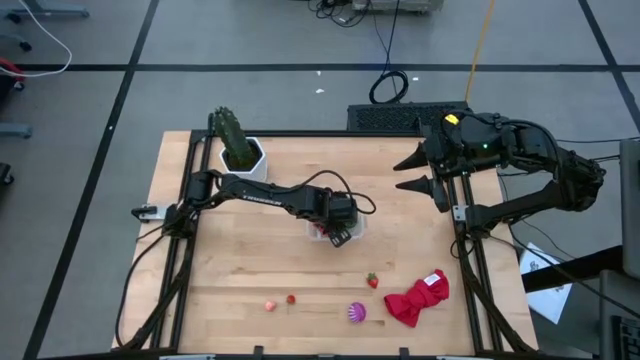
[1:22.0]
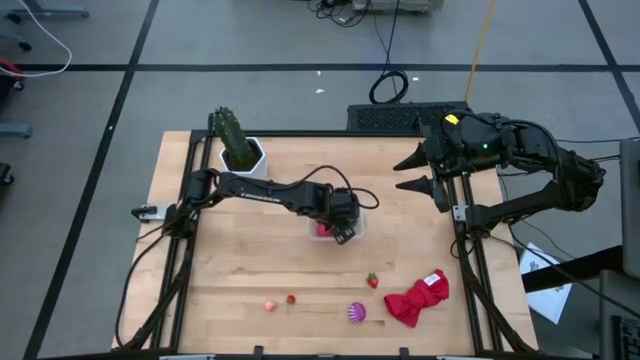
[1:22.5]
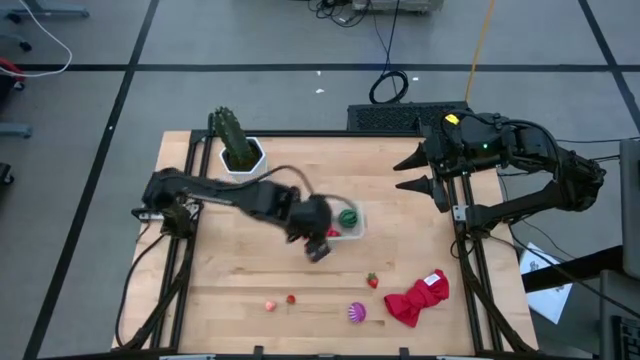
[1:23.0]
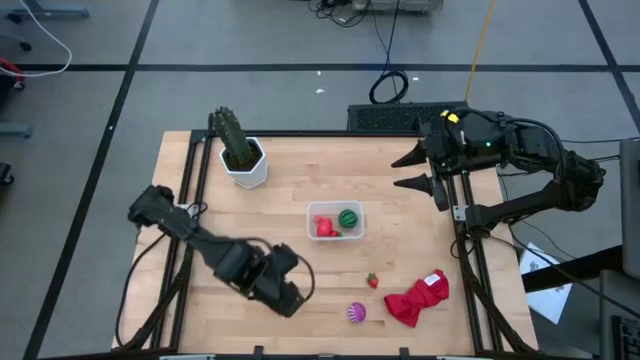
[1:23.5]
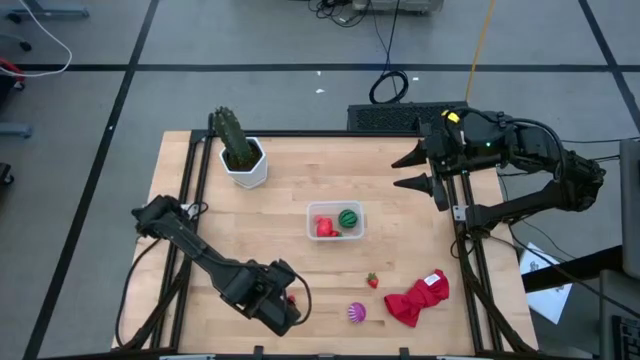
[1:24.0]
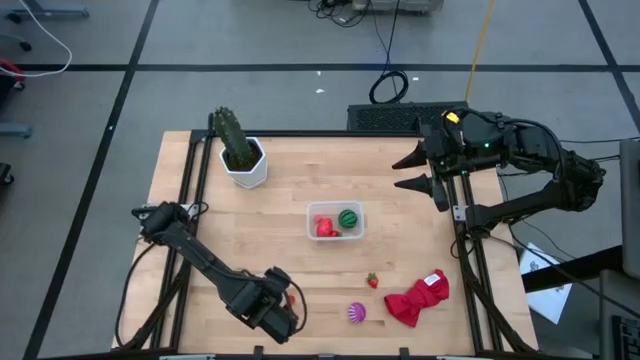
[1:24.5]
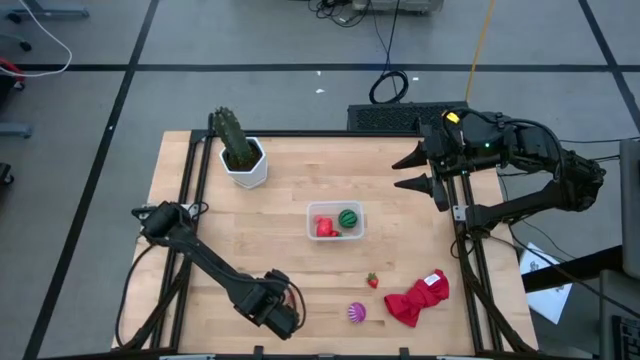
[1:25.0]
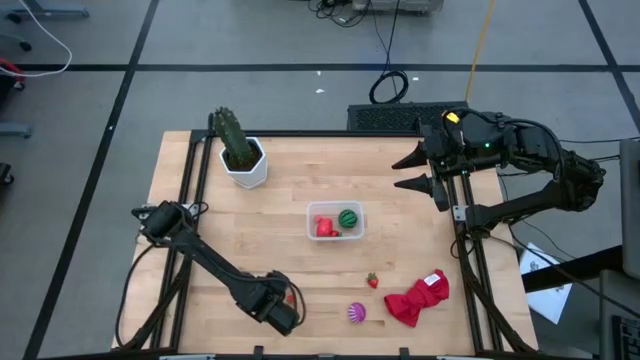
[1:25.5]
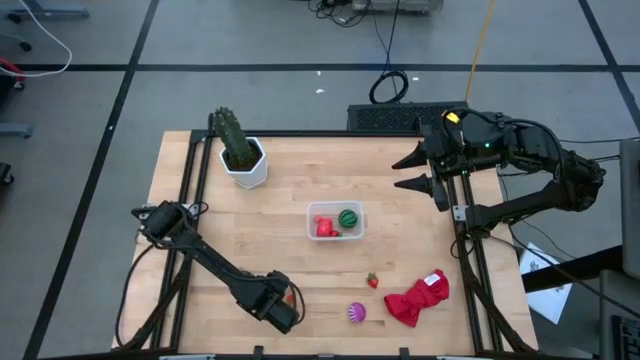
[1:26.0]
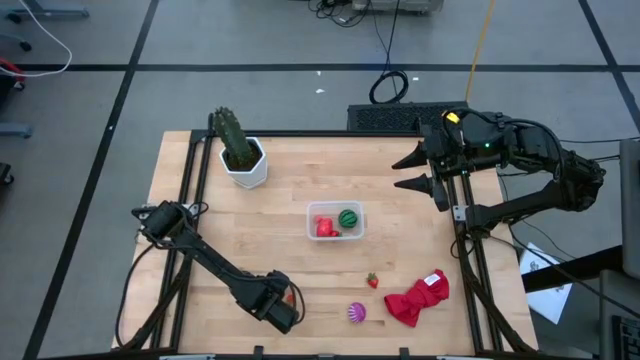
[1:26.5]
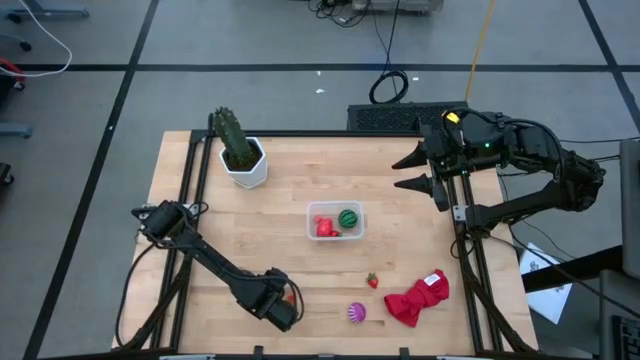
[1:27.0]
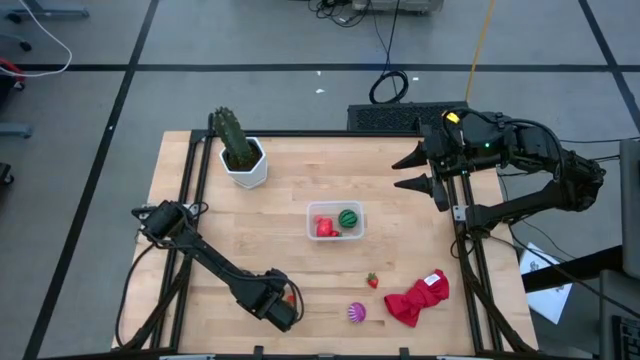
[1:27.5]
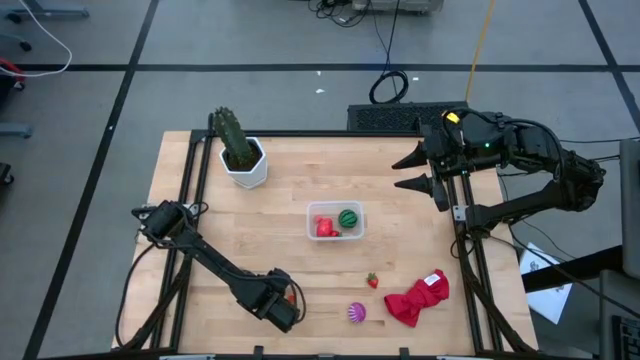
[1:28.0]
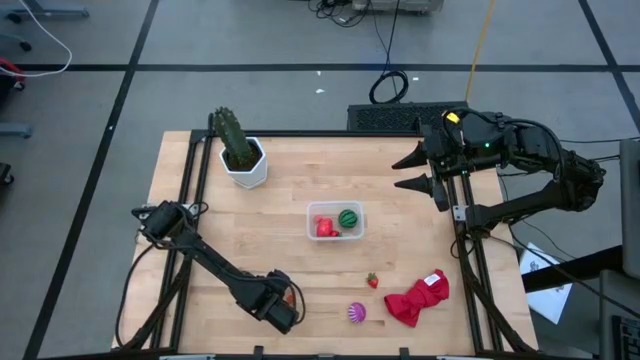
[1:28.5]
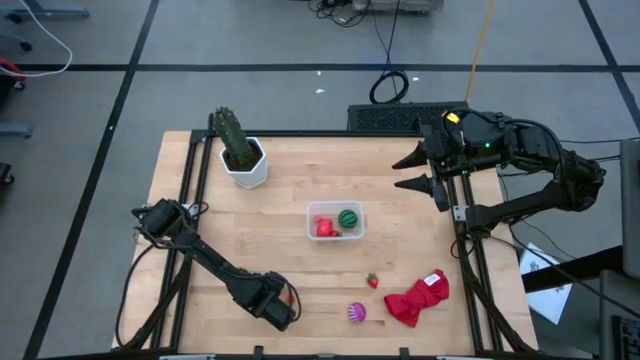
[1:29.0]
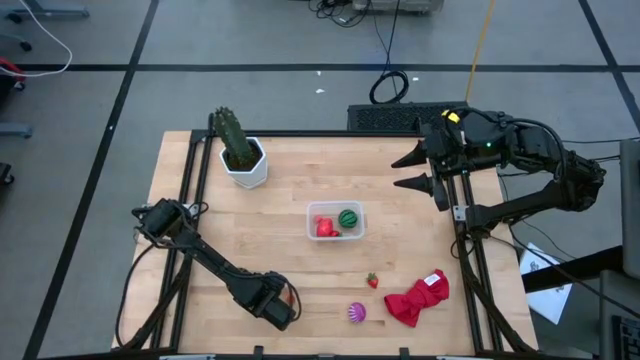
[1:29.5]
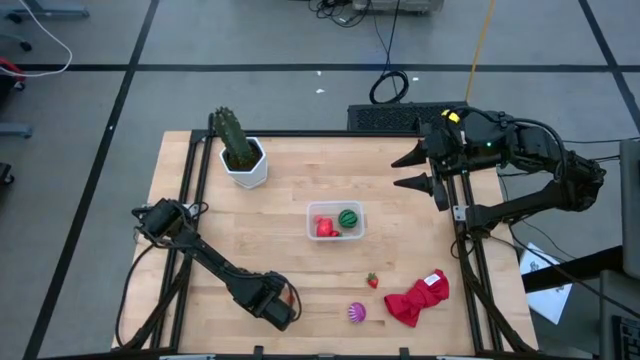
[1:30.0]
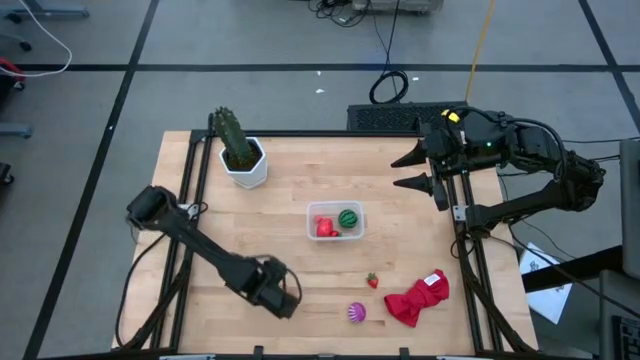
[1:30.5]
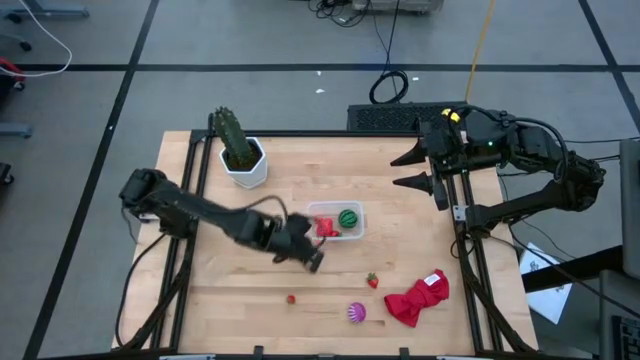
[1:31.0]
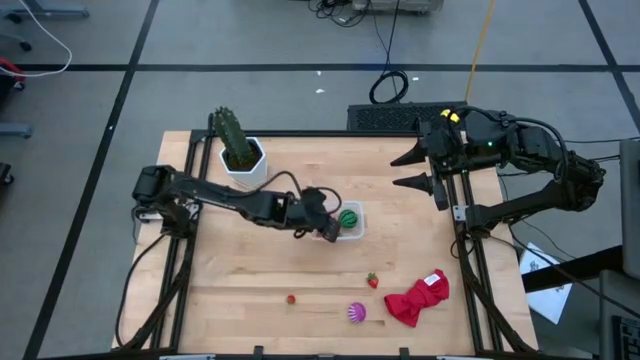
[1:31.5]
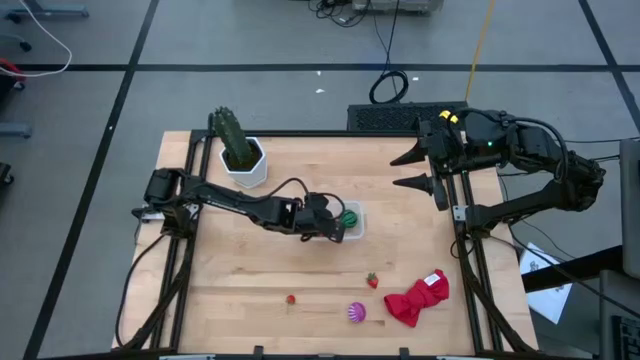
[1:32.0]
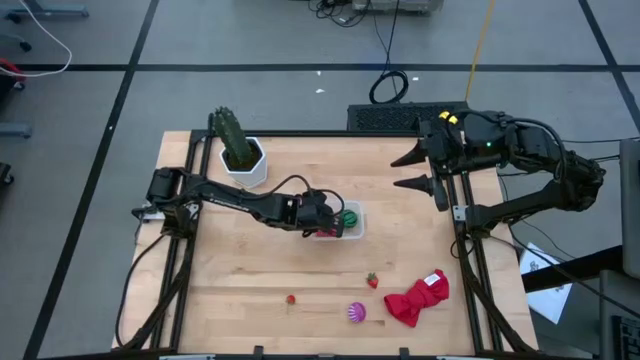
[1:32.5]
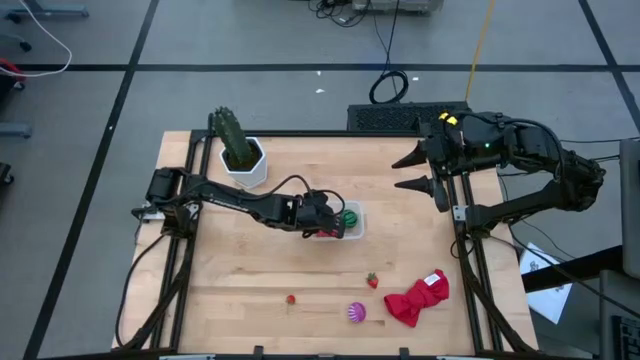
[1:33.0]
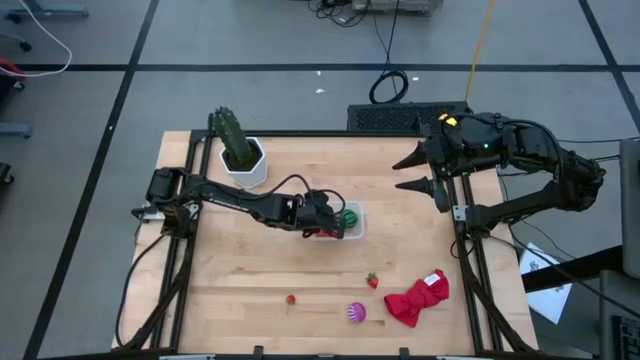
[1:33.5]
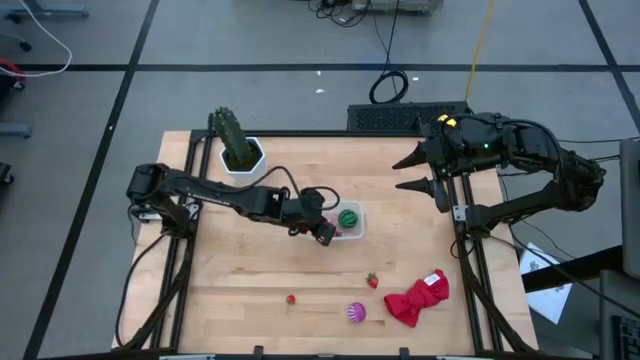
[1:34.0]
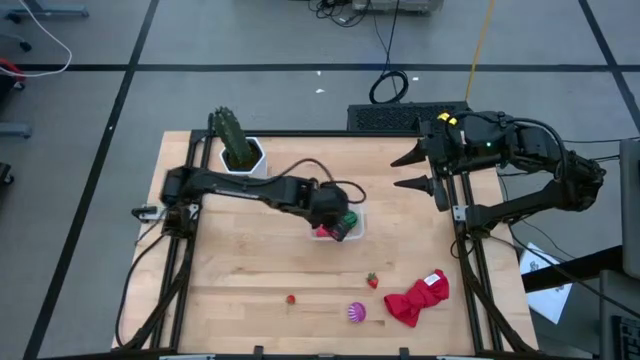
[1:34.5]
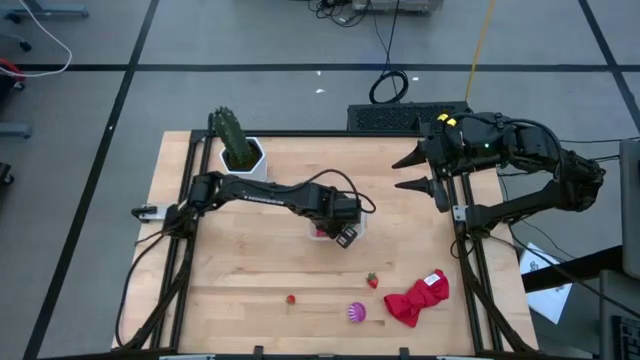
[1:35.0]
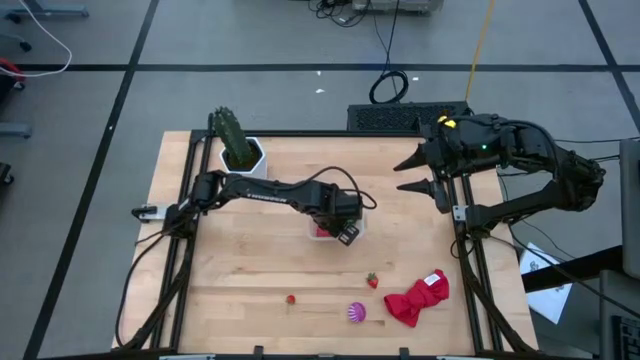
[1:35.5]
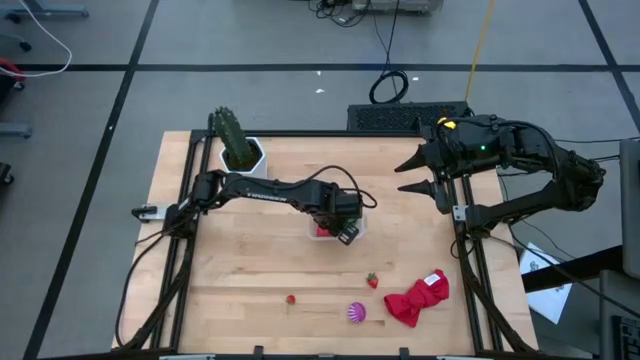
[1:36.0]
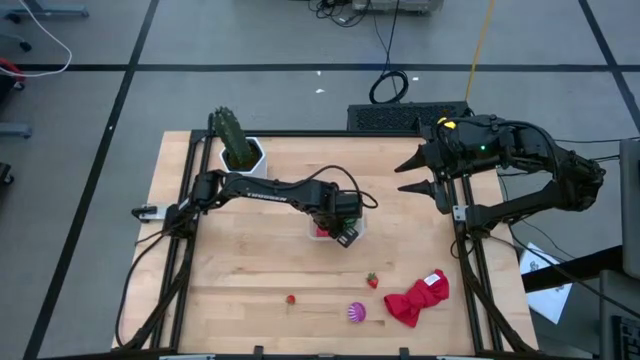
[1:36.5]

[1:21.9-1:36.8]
Task: Pick and placing Produce into tupperware
Put the peach into the transparent bin

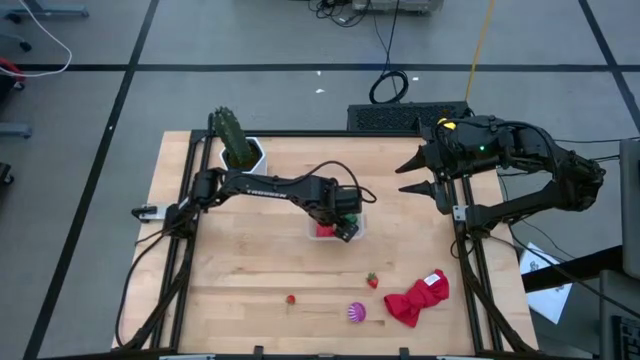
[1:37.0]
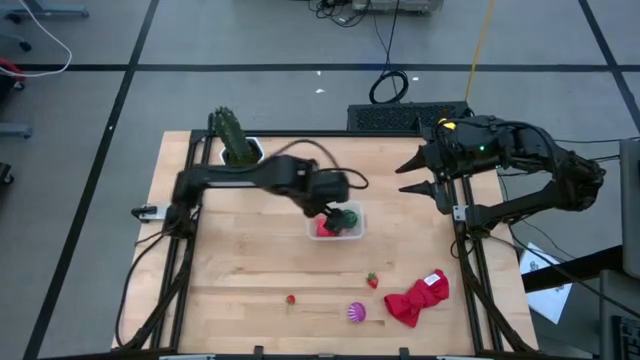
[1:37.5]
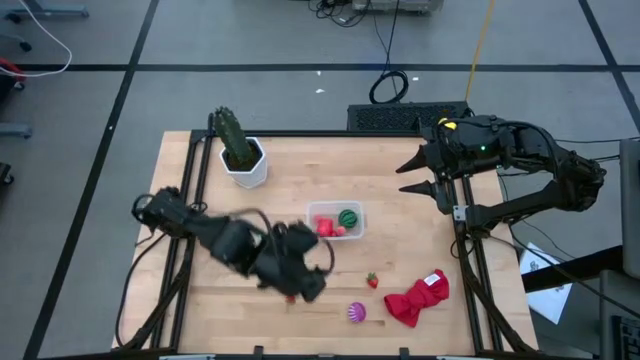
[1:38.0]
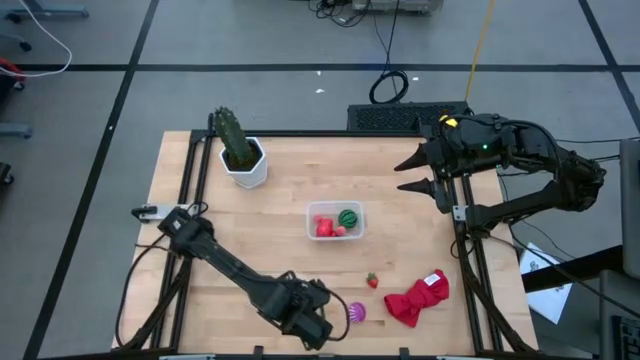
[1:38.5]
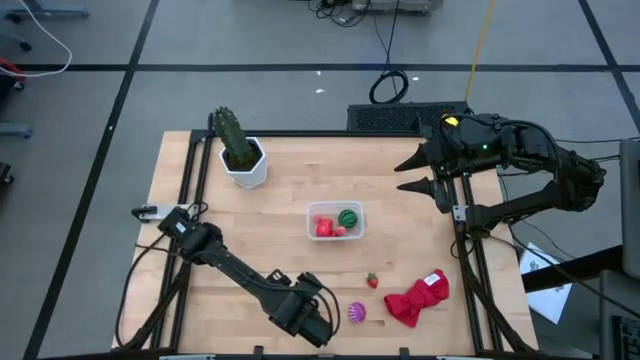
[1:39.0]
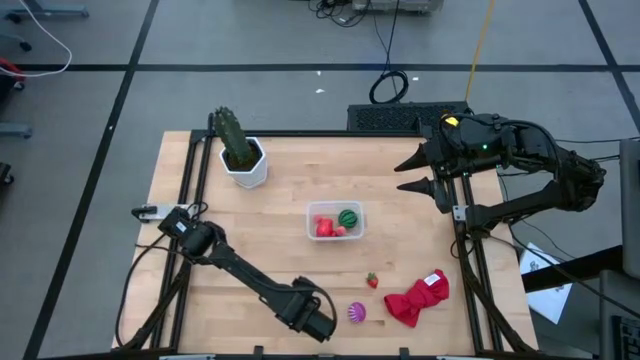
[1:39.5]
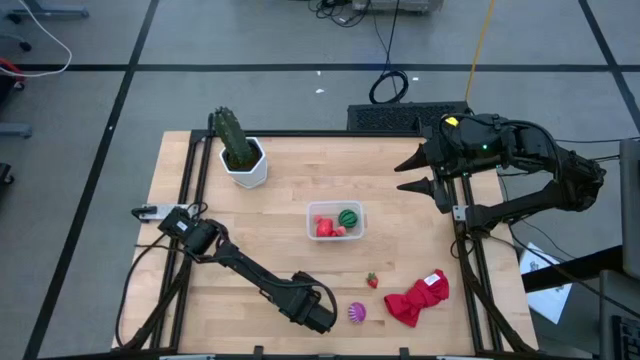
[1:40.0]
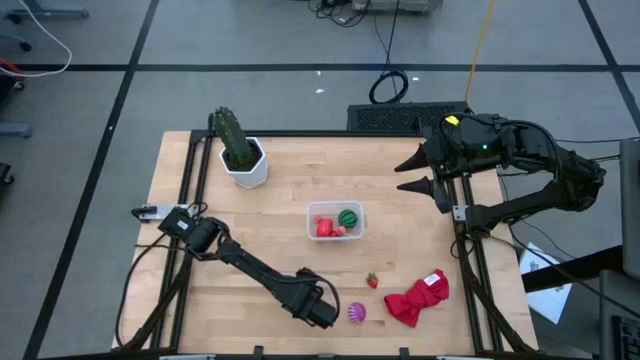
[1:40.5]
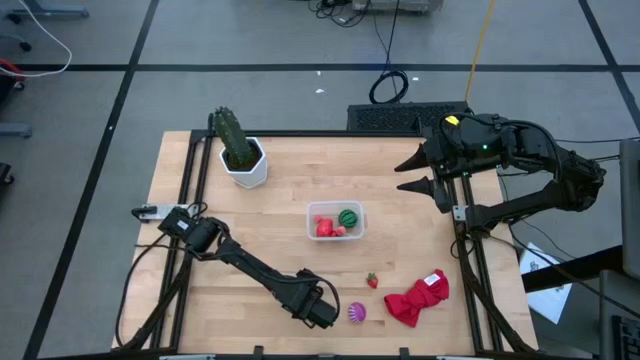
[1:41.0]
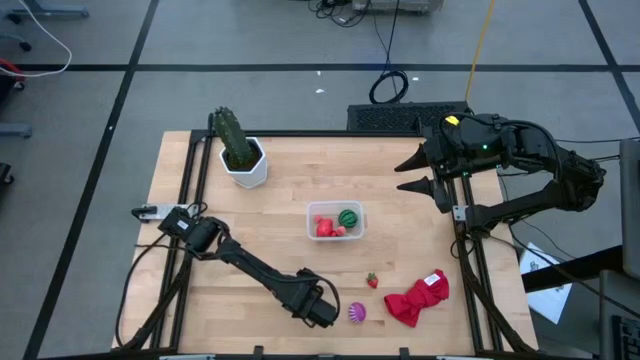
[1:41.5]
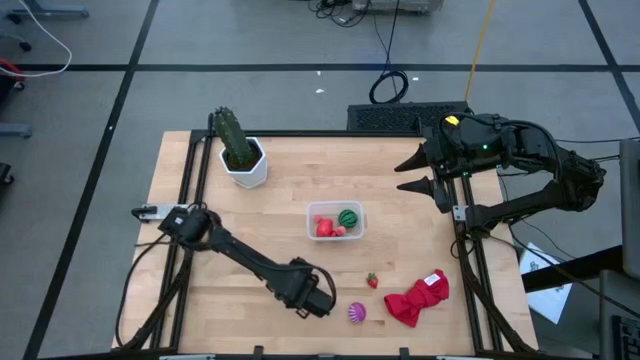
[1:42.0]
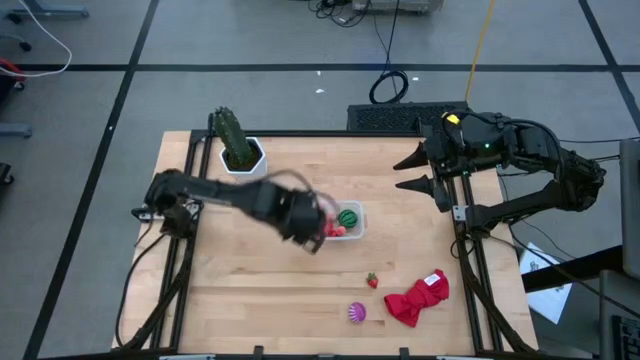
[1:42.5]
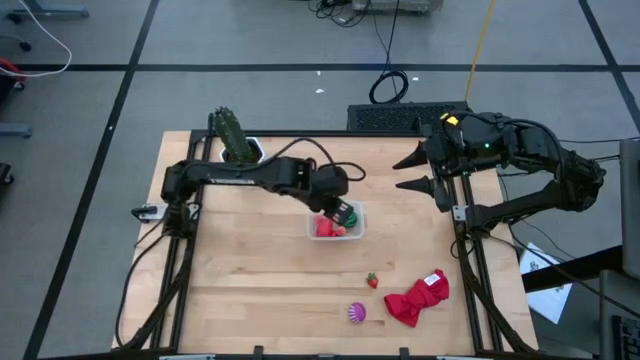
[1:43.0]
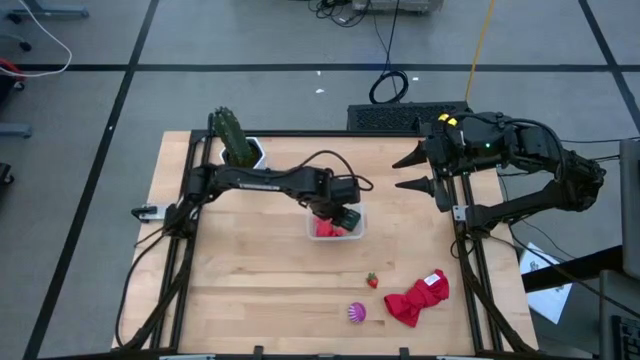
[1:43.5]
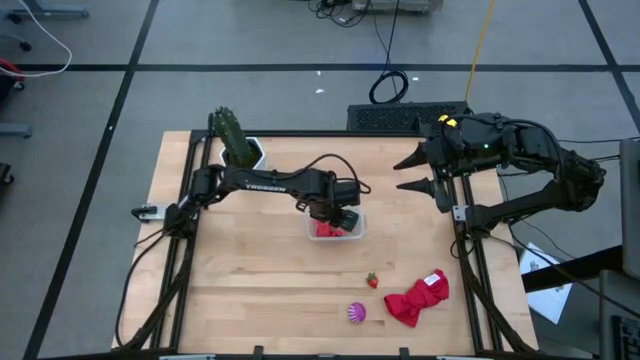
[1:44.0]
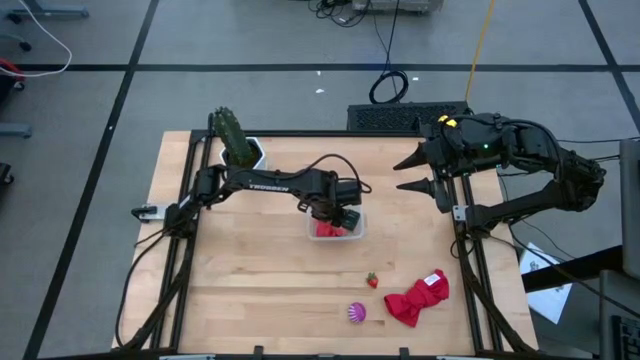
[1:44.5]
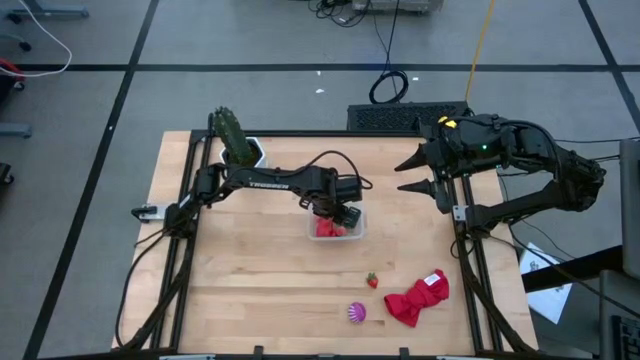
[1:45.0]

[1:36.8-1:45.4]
Put the left strawberry into the transparent bin
